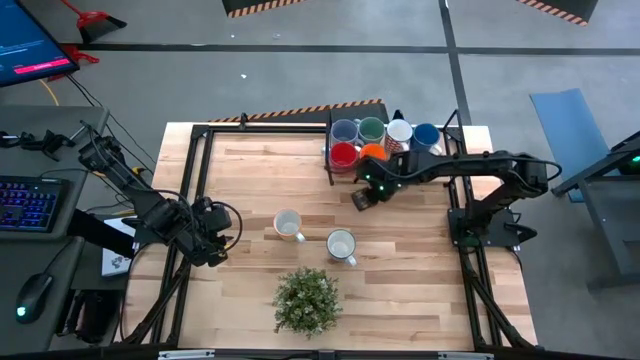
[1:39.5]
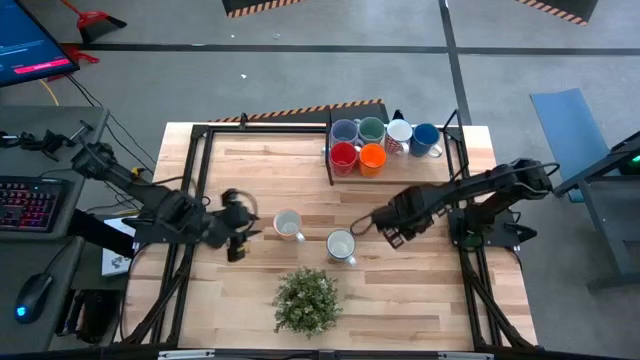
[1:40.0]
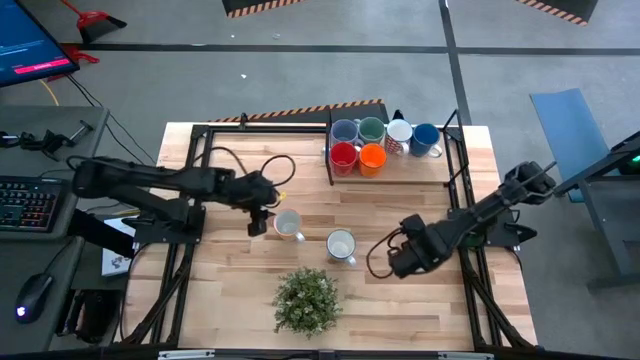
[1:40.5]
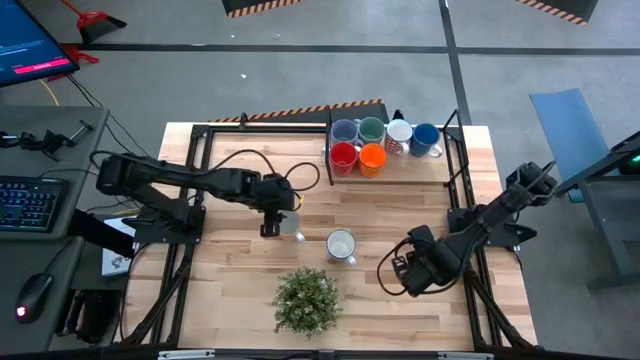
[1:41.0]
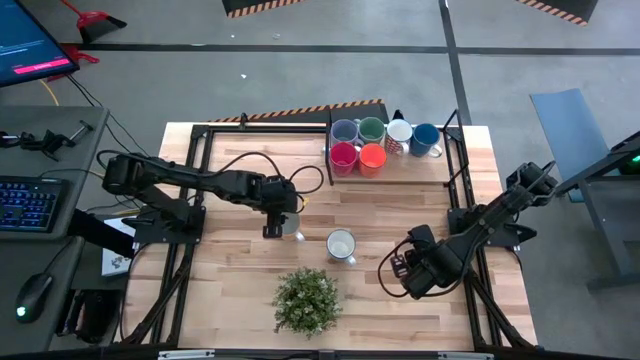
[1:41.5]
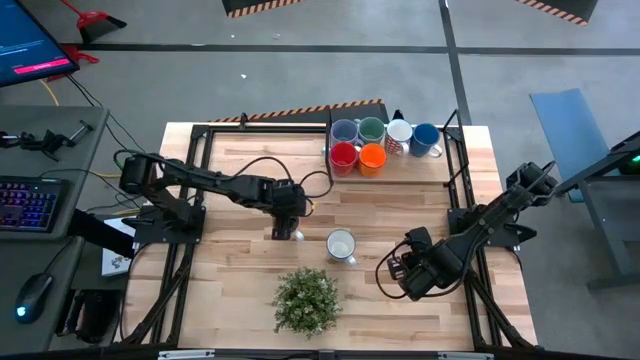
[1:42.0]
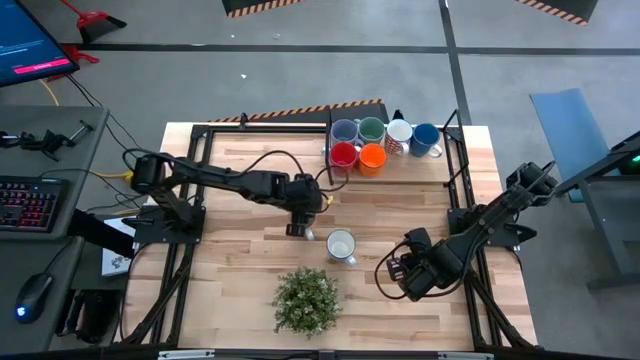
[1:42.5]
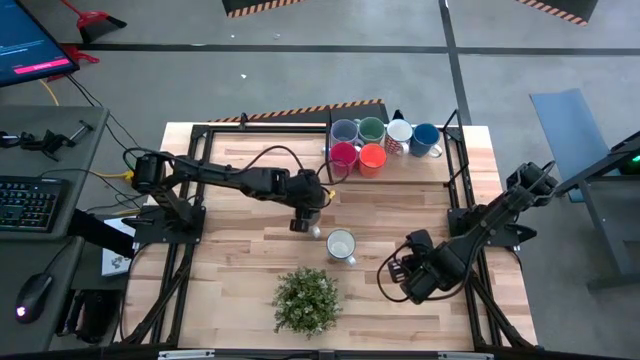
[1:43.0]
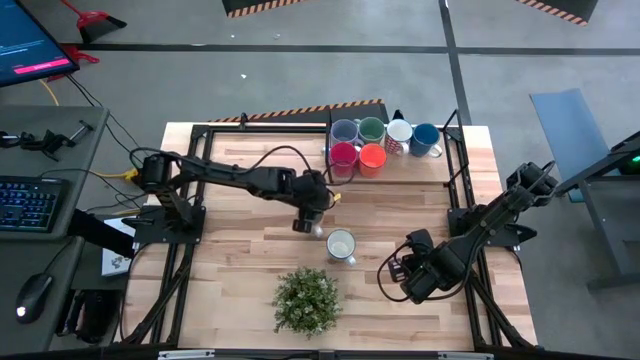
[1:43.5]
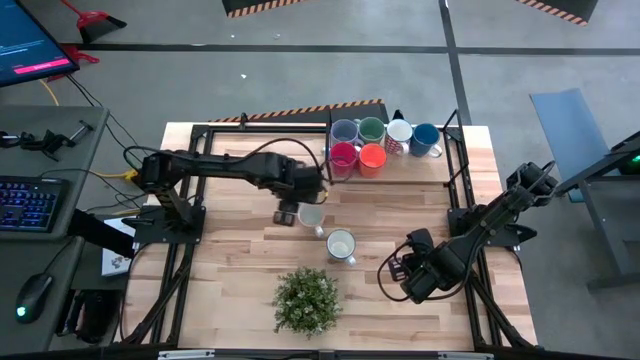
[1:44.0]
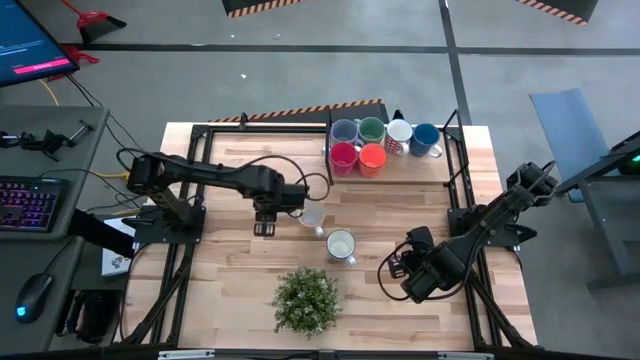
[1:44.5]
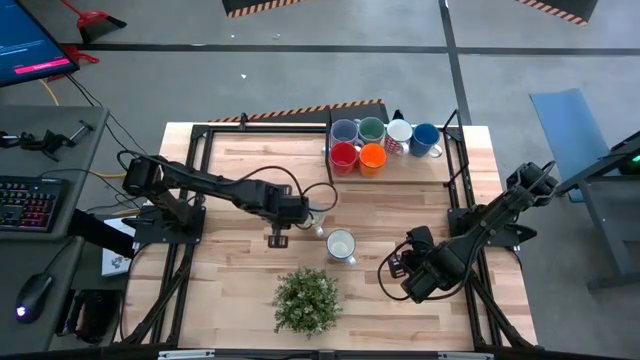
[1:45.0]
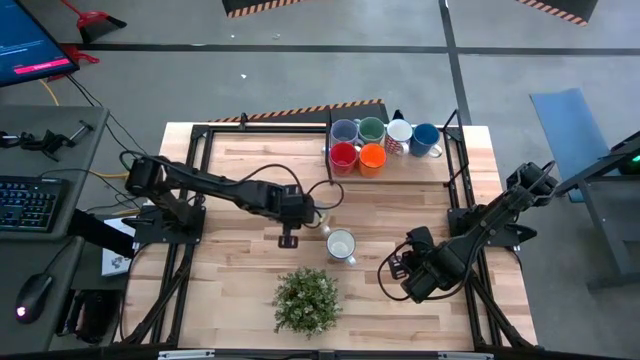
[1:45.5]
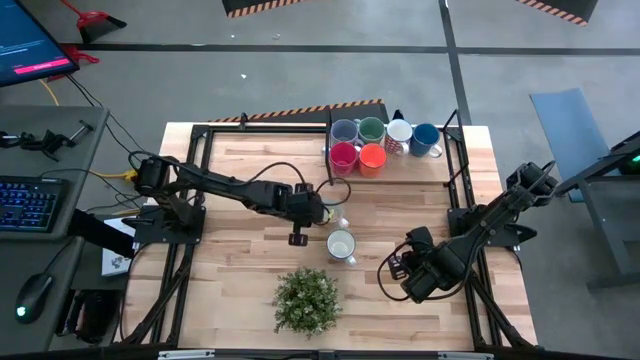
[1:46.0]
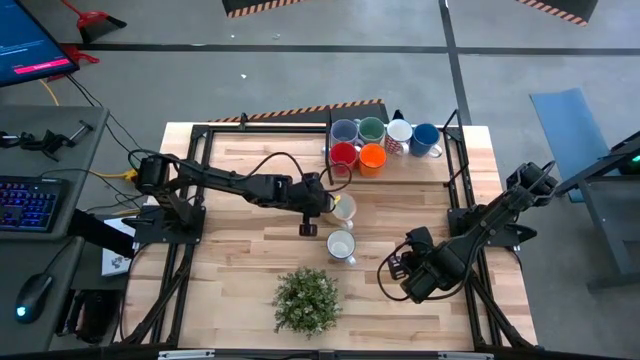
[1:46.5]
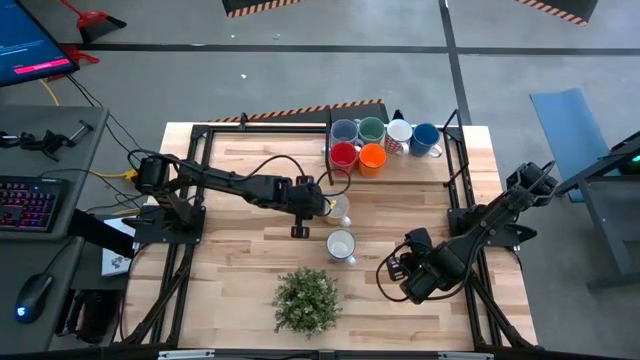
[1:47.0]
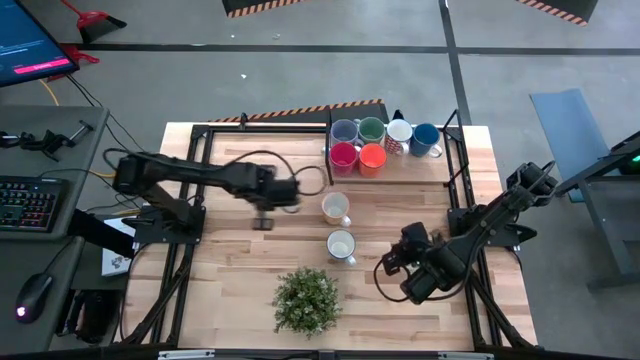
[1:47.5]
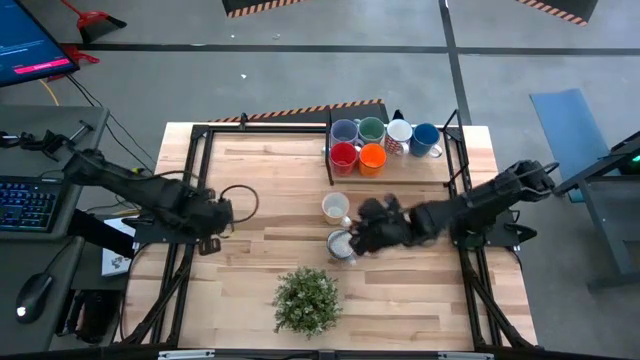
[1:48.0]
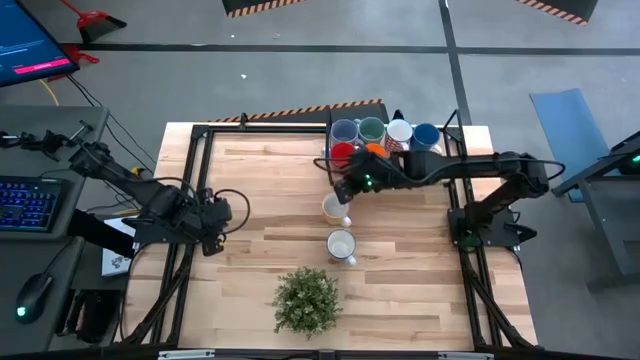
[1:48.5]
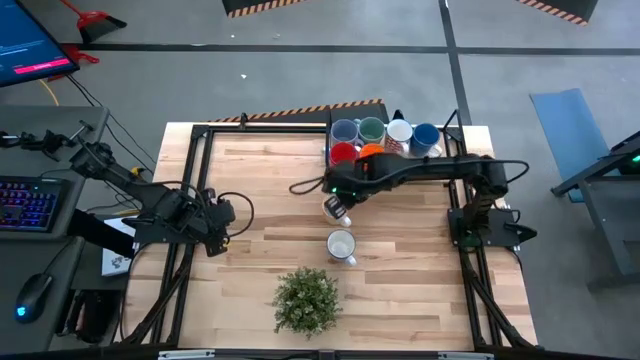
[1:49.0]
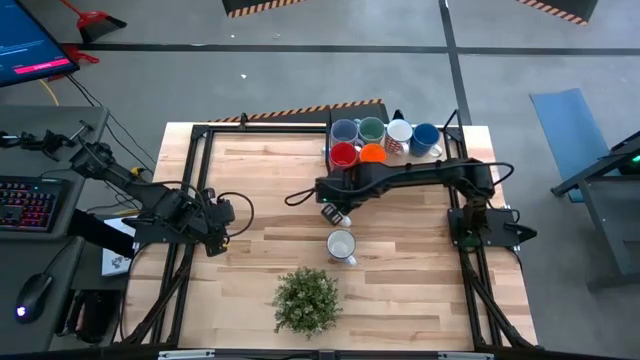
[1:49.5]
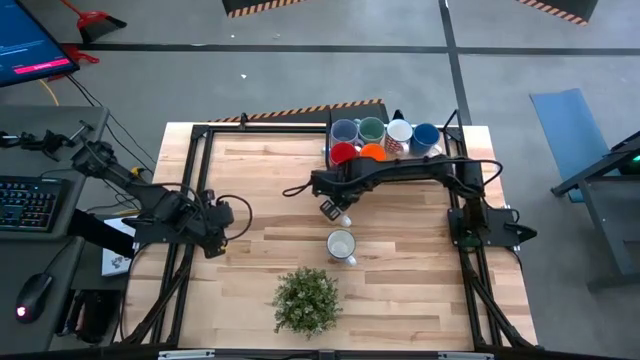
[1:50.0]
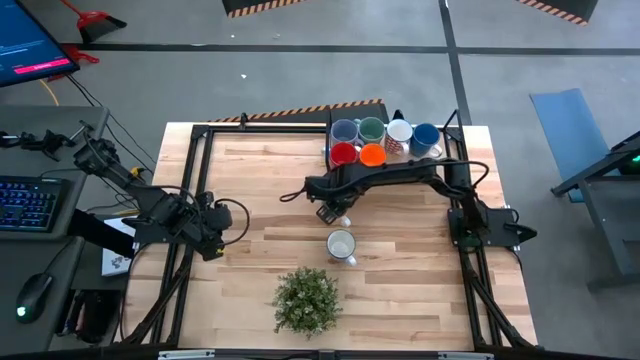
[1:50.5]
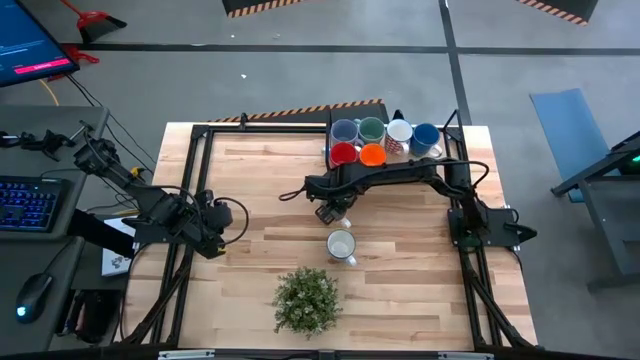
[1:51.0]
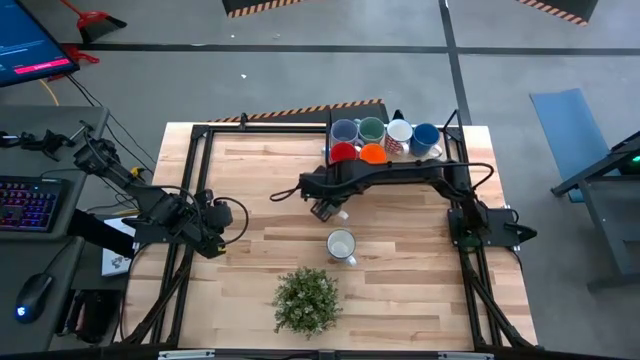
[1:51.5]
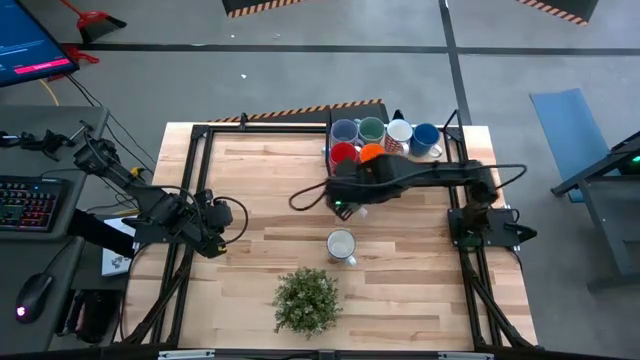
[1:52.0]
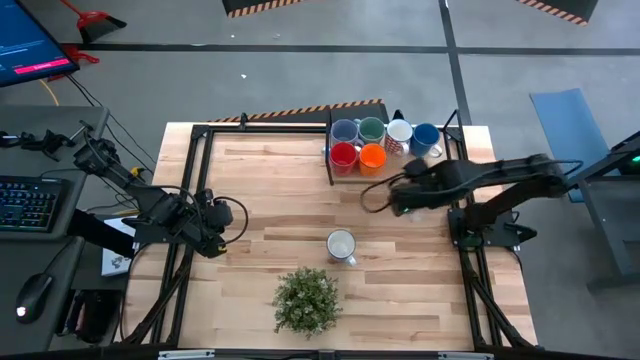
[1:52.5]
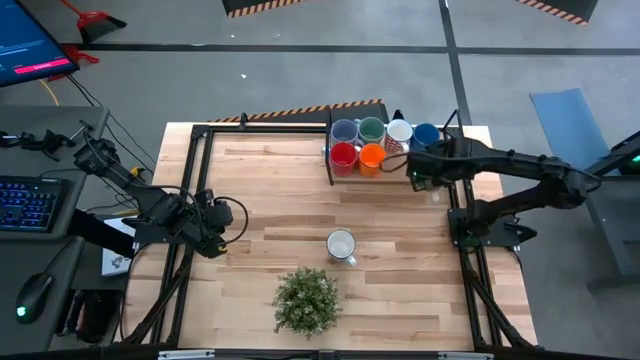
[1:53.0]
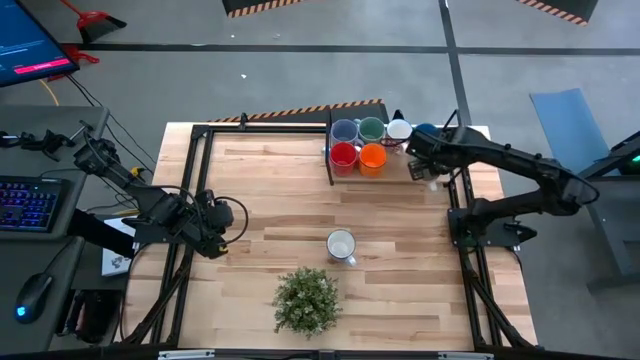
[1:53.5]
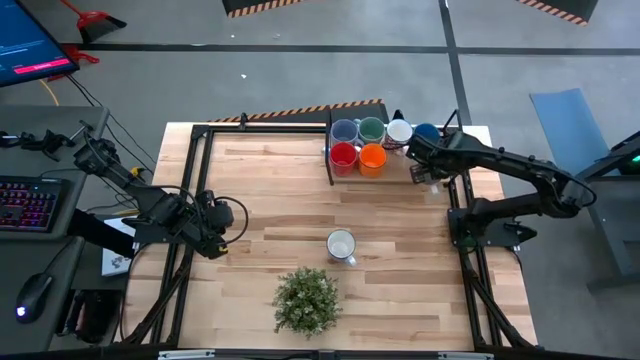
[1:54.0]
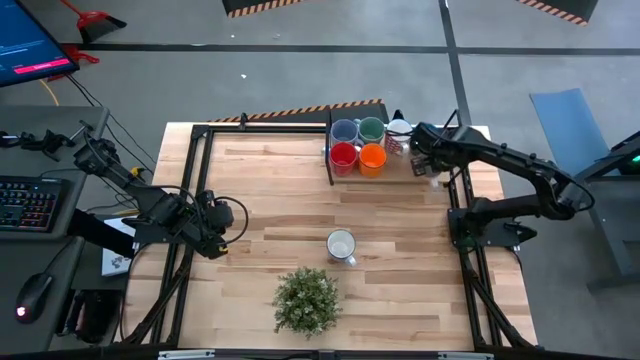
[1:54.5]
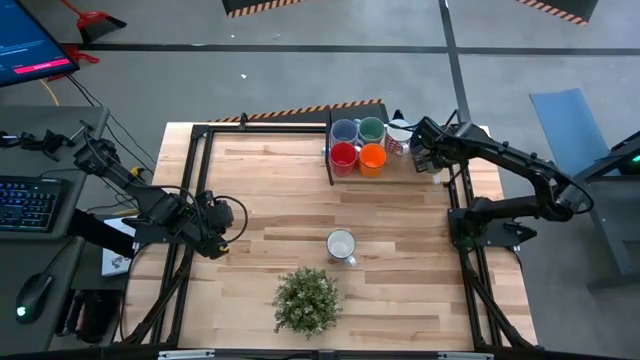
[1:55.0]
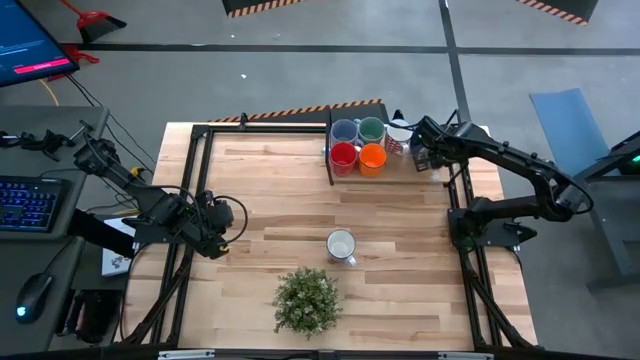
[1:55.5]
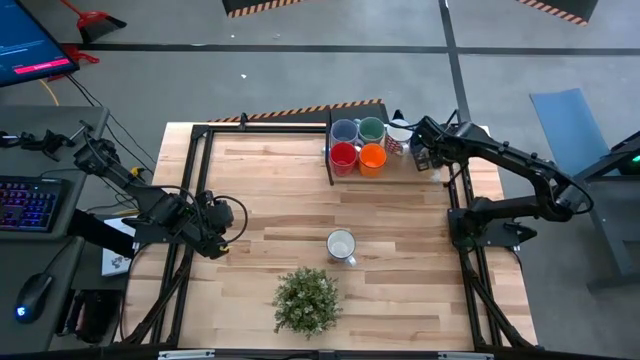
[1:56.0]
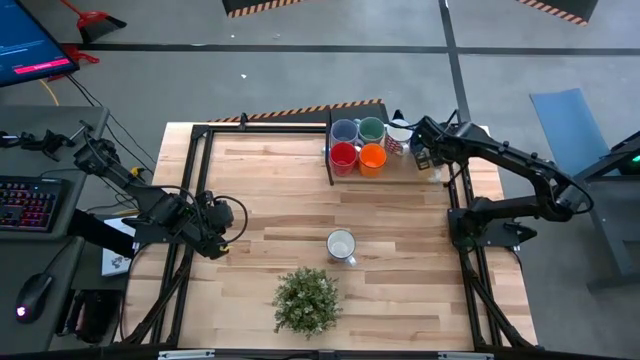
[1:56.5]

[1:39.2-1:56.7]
Task: Place coffee mugs
Put the yellow patterned mug on the shelf

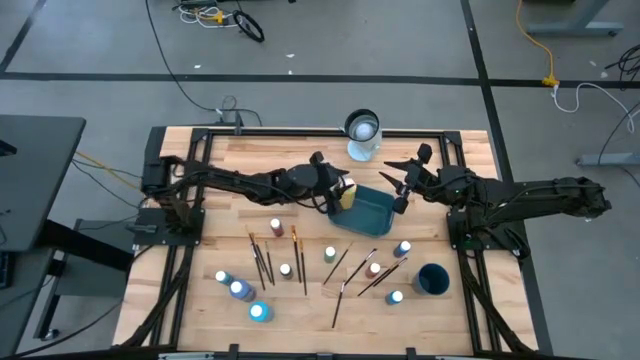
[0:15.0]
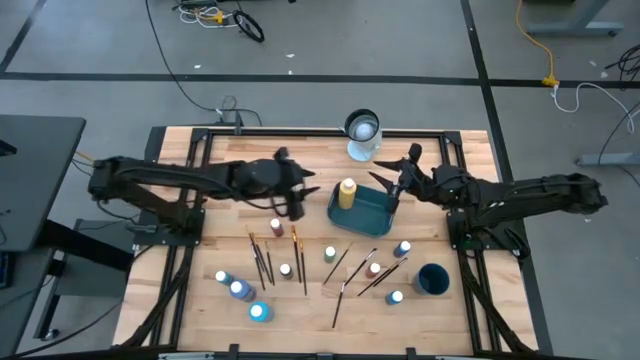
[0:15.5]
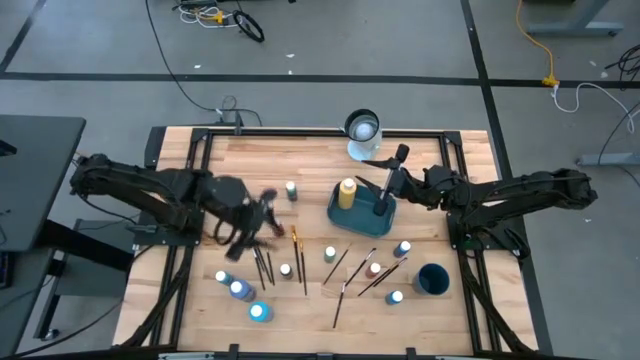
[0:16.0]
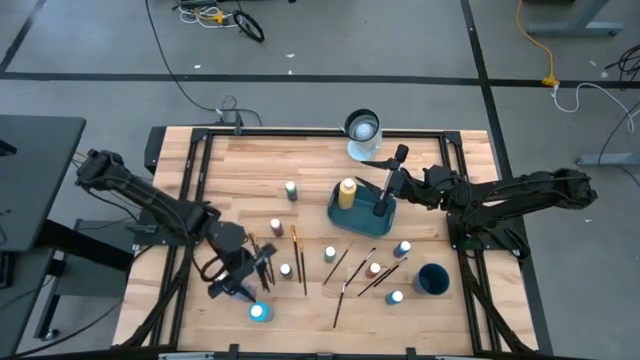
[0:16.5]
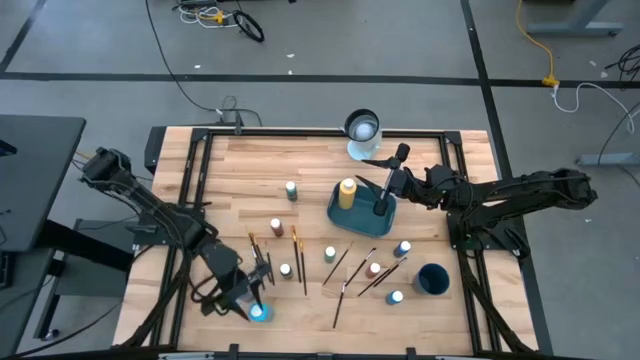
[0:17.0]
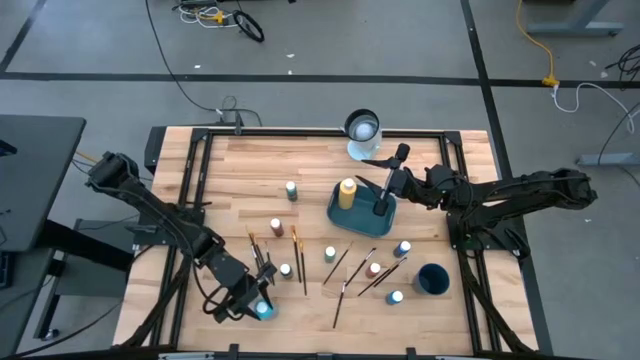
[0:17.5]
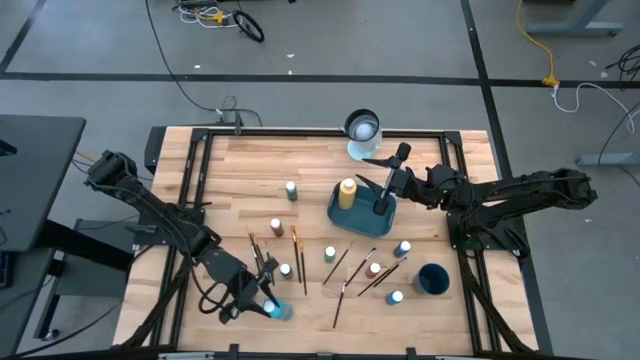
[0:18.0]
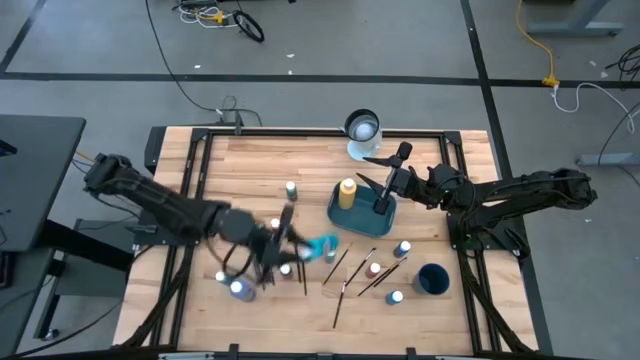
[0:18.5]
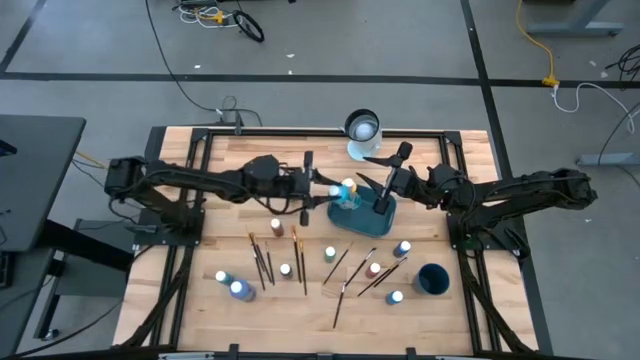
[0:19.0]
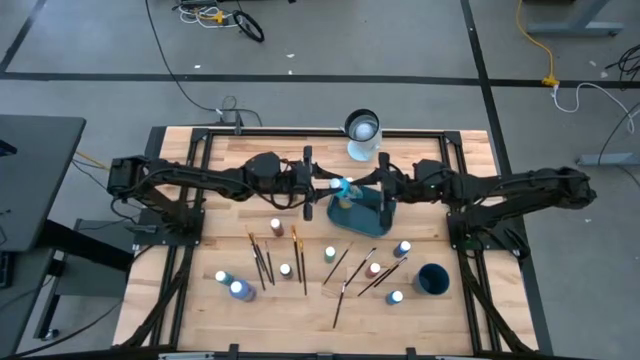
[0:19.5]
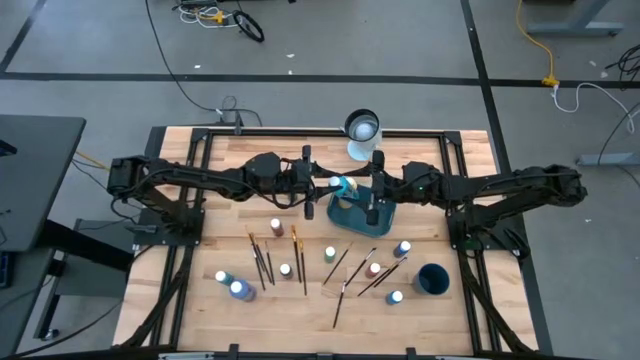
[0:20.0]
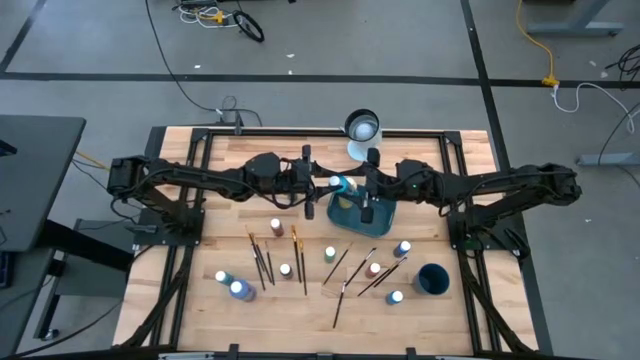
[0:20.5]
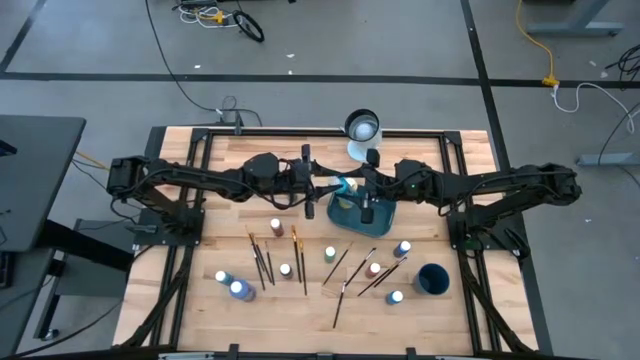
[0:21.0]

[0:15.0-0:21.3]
Task: Pick & Place Paint Supplies
Put the large light blue paint bottle into the green bin
